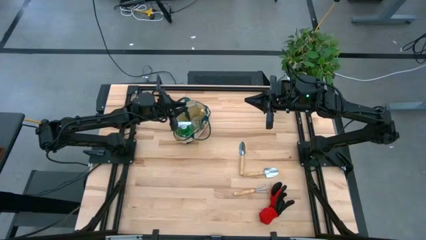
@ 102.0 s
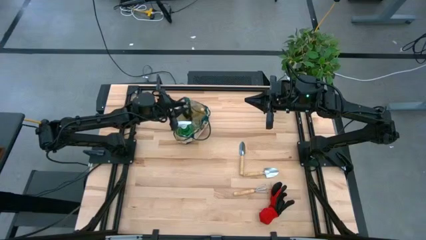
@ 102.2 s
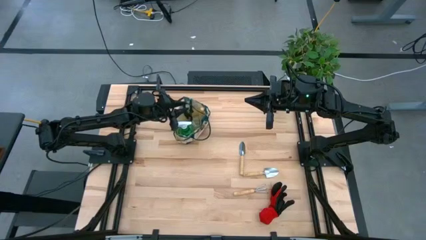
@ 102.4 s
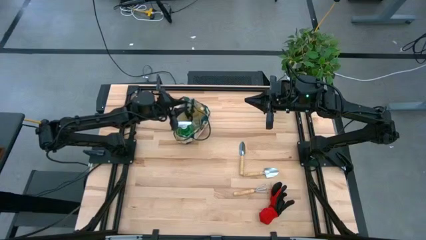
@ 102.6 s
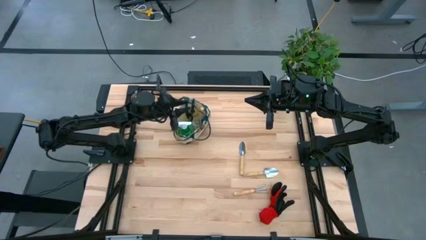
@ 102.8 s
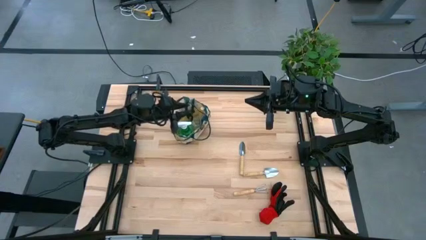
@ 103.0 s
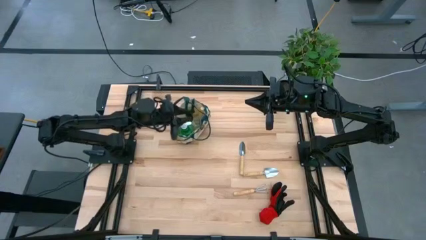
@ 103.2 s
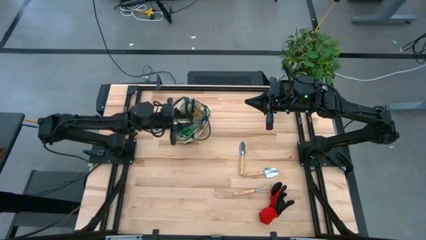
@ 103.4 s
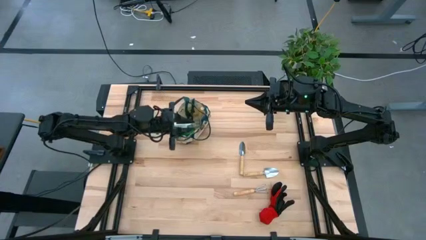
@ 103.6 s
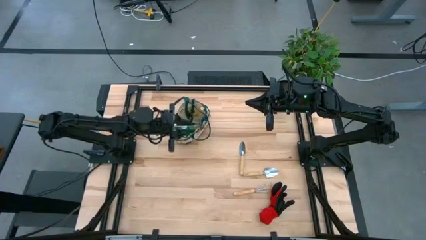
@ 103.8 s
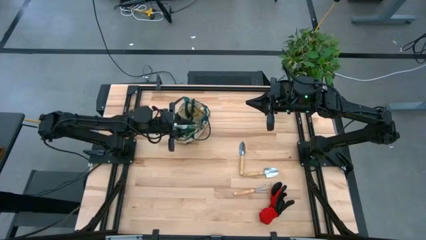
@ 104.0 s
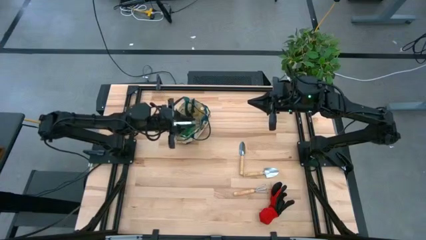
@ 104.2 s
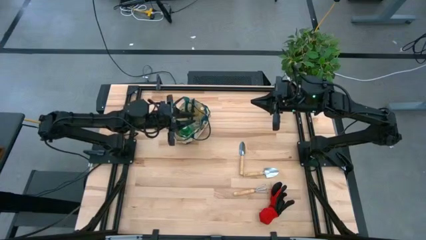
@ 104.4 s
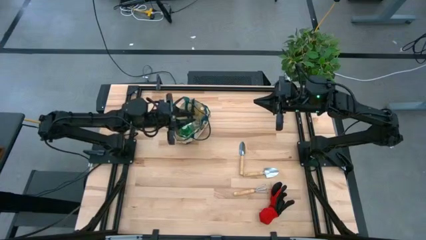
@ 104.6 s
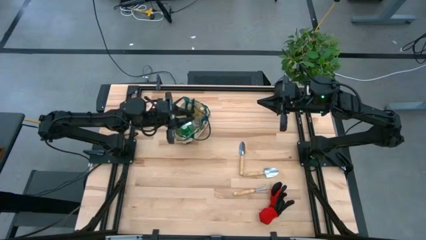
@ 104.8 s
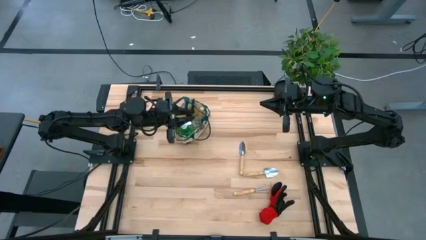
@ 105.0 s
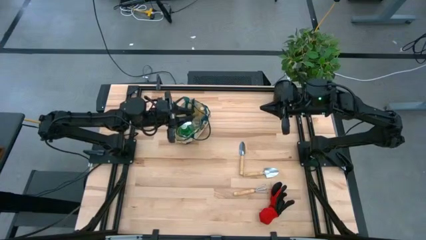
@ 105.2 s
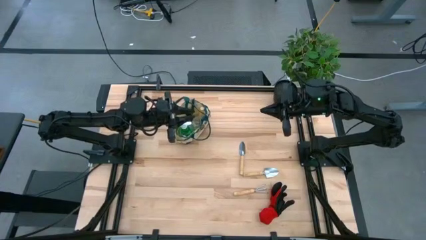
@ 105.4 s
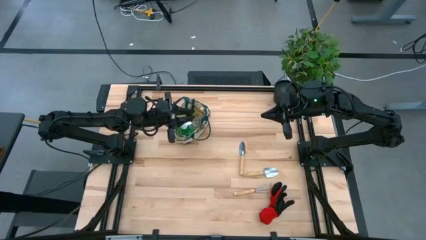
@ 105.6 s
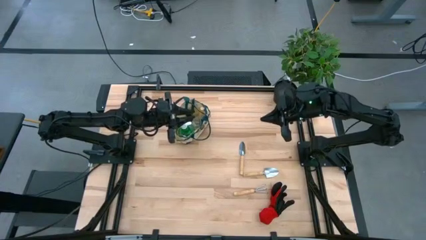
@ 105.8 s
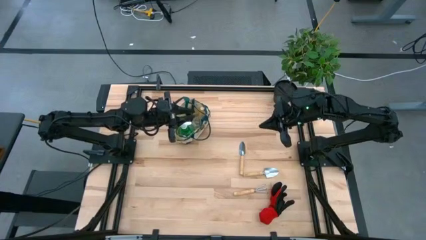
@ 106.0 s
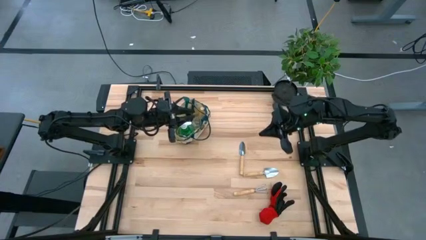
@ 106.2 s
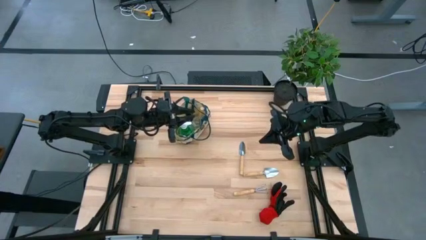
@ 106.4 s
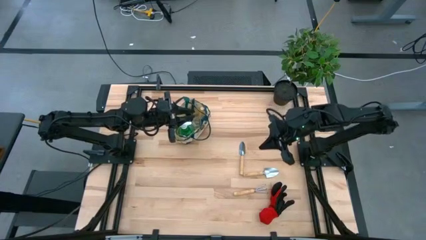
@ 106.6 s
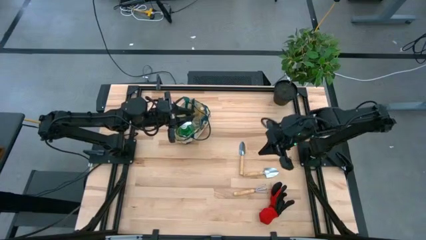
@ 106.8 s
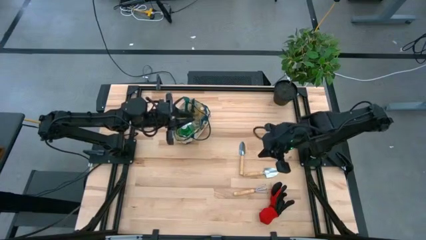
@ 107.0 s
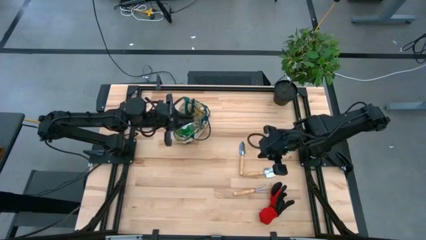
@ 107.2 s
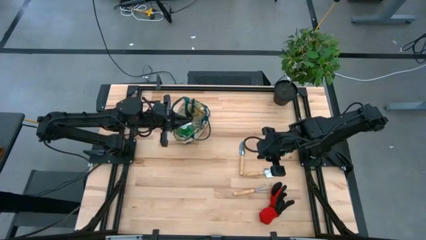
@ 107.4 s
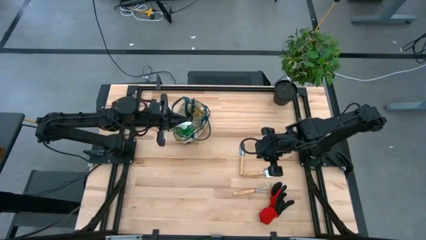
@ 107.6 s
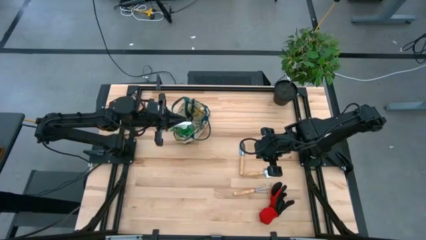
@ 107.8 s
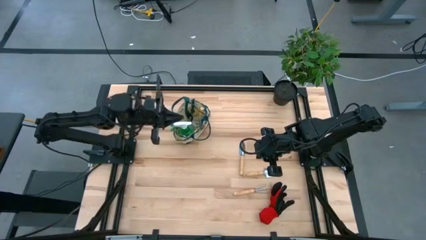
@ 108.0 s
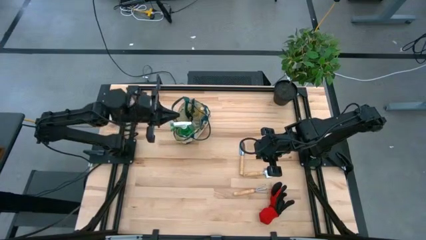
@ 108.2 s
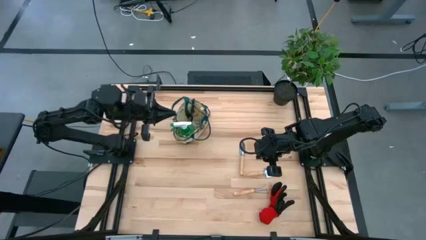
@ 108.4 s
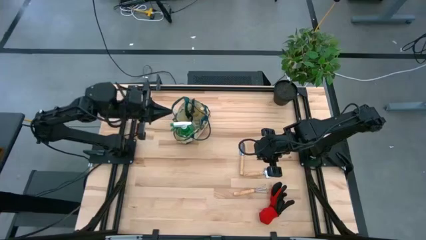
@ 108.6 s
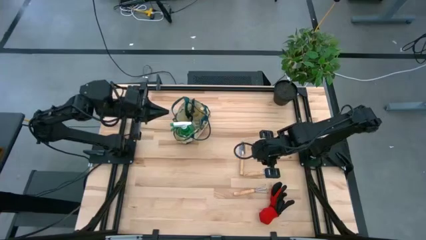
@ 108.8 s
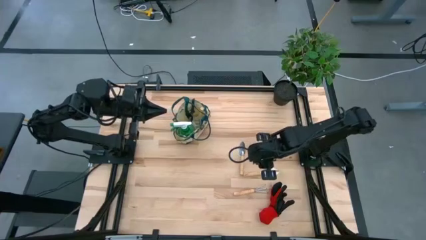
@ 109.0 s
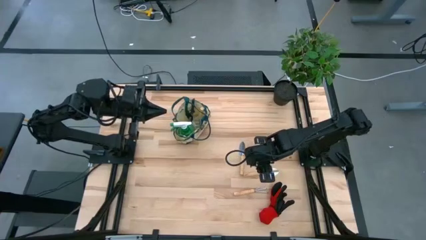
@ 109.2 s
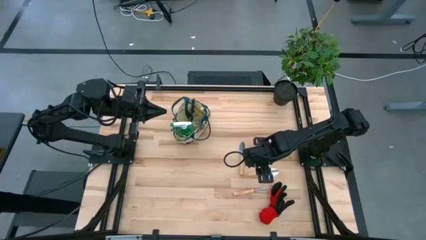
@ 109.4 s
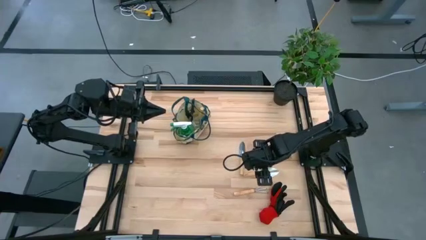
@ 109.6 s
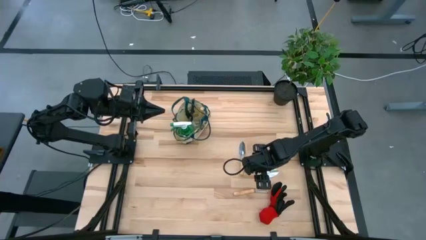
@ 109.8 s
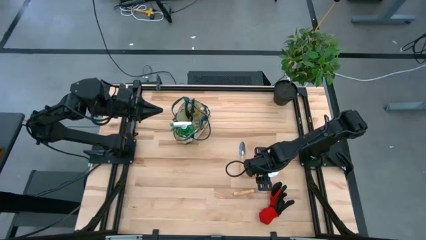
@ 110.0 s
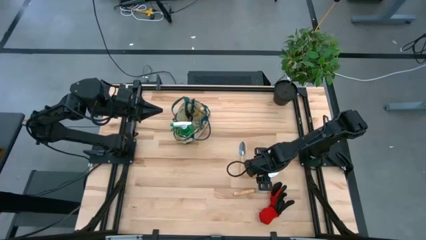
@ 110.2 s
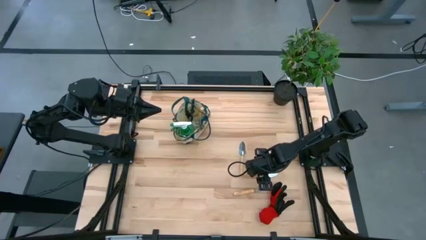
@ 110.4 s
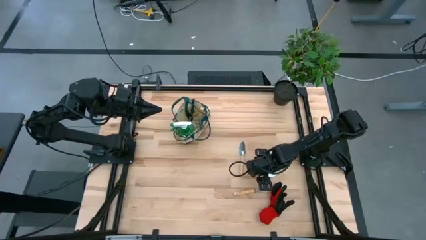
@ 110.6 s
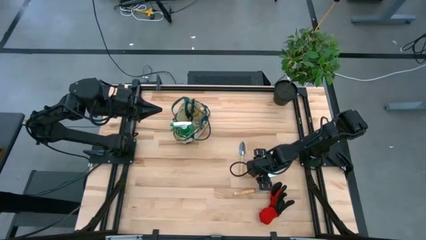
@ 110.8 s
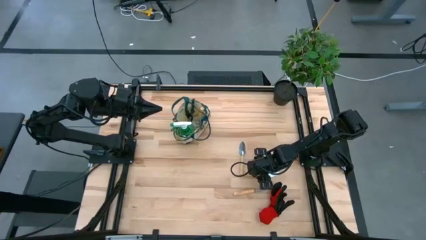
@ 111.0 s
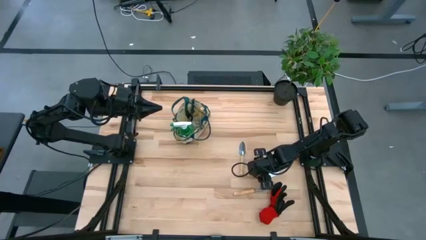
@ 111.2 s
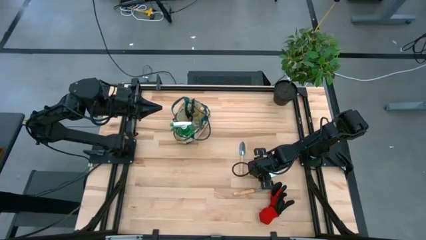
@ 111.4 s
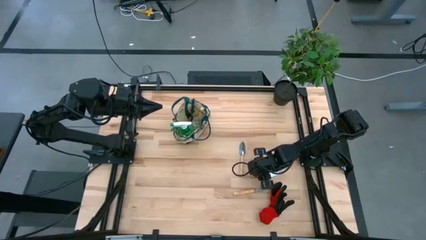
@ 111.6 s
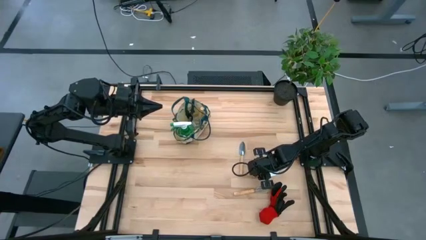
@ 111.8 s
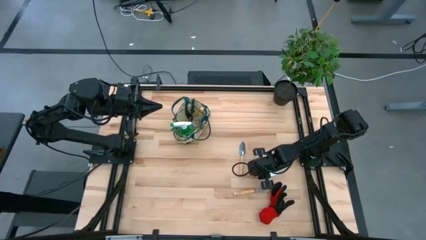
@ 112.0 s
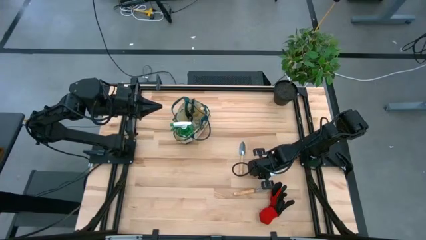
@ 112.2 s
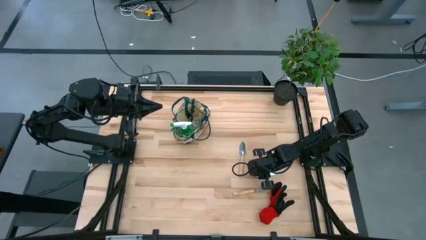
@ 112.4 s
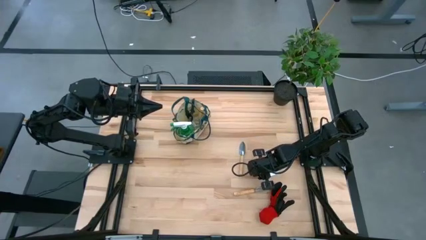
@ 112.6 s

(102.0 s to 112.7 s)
Task: Pick & Place Garden tools in Gardening bag
Put the right brown trowel into the gardening bag

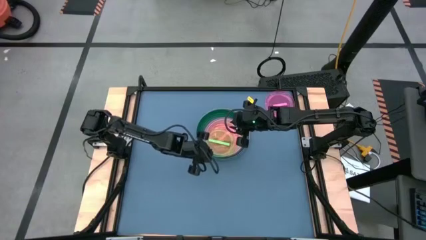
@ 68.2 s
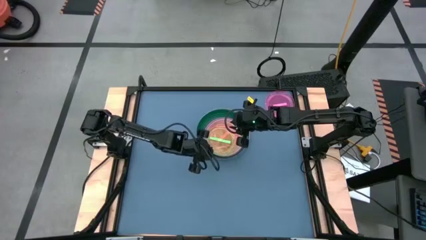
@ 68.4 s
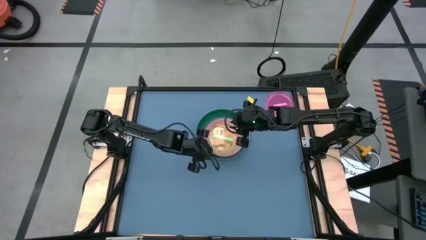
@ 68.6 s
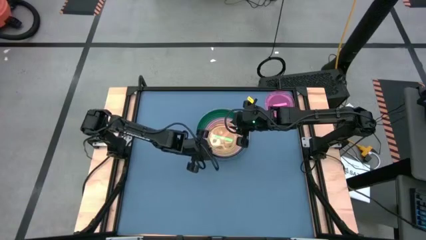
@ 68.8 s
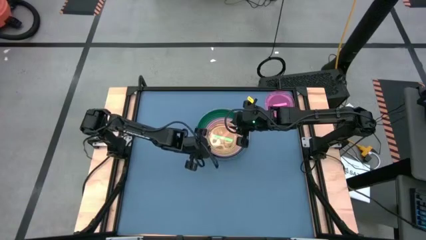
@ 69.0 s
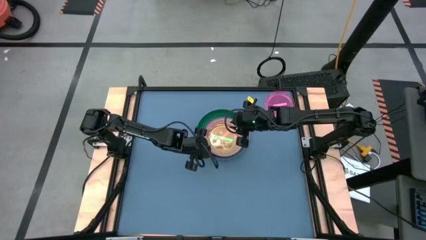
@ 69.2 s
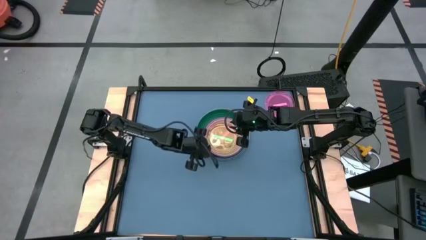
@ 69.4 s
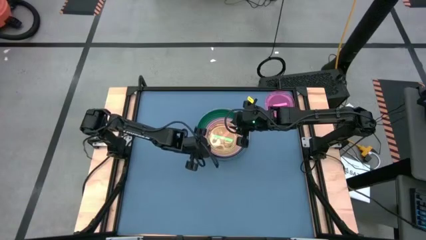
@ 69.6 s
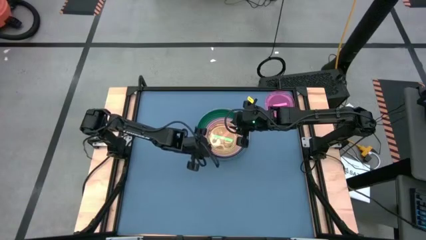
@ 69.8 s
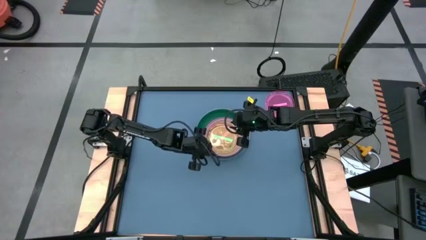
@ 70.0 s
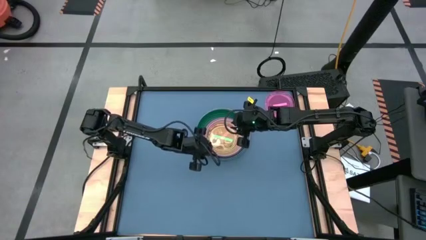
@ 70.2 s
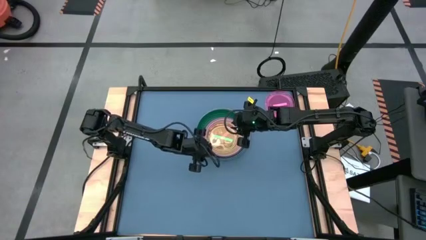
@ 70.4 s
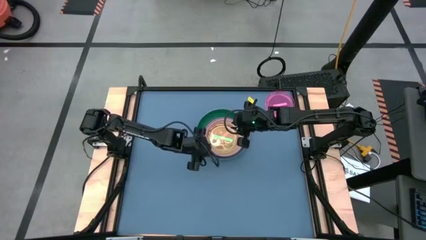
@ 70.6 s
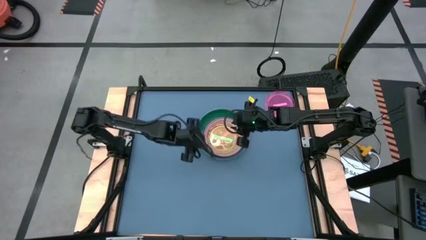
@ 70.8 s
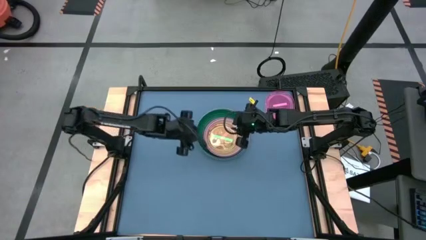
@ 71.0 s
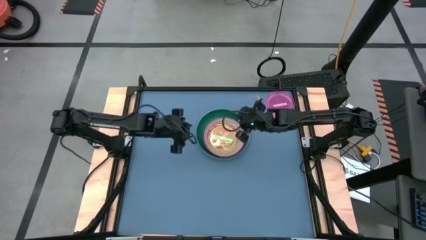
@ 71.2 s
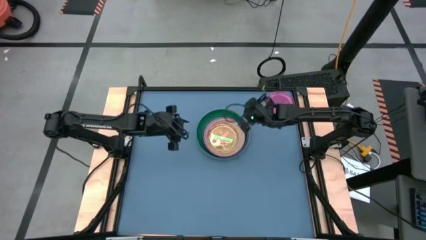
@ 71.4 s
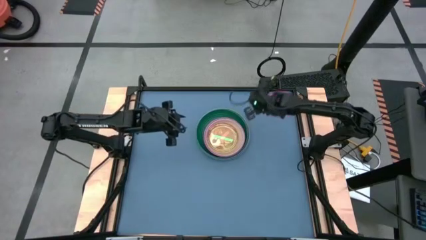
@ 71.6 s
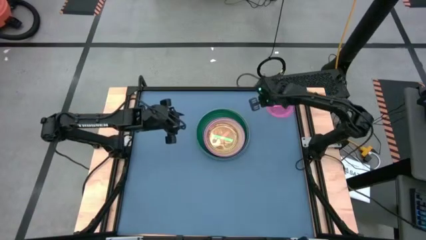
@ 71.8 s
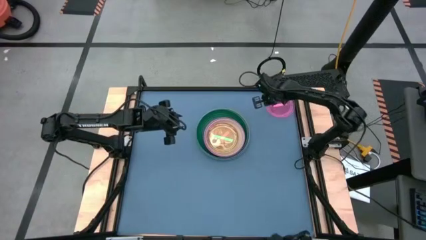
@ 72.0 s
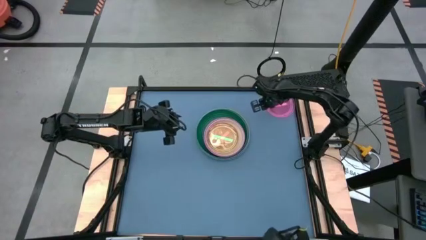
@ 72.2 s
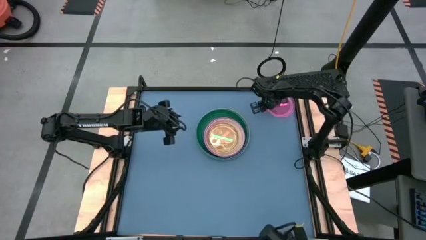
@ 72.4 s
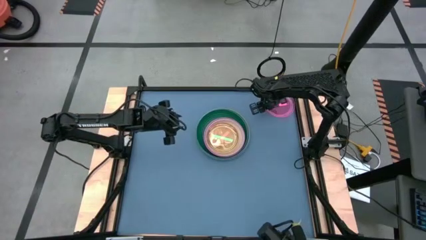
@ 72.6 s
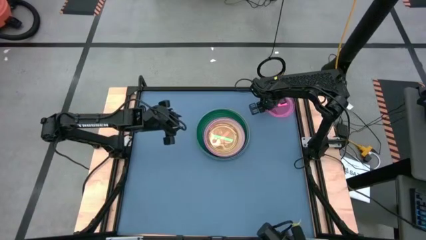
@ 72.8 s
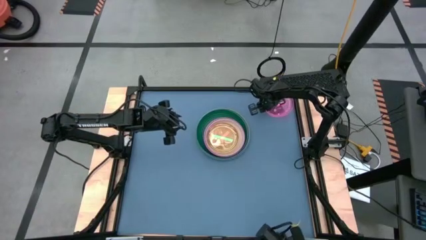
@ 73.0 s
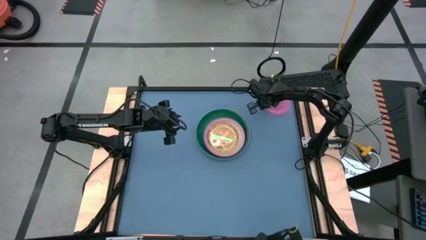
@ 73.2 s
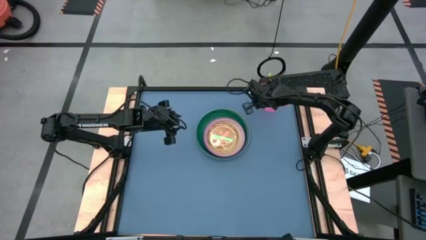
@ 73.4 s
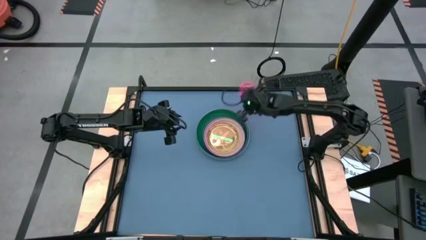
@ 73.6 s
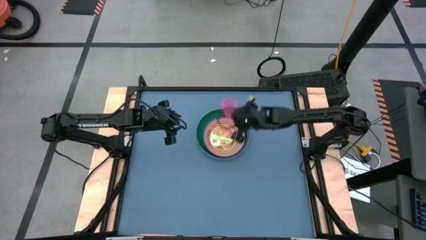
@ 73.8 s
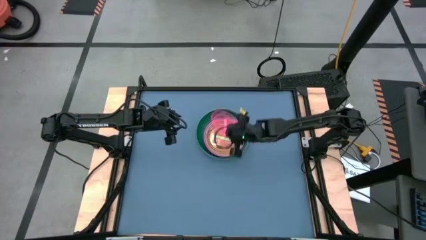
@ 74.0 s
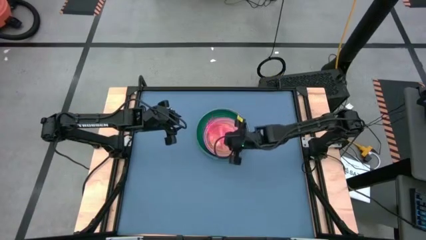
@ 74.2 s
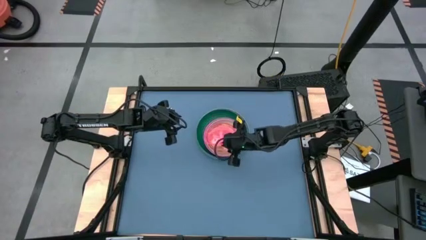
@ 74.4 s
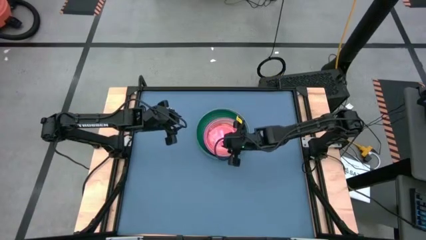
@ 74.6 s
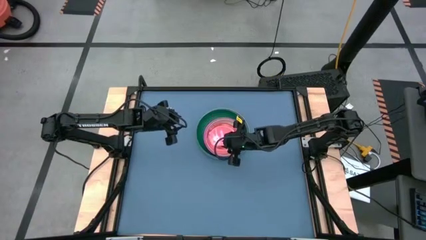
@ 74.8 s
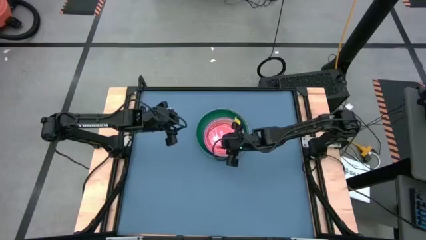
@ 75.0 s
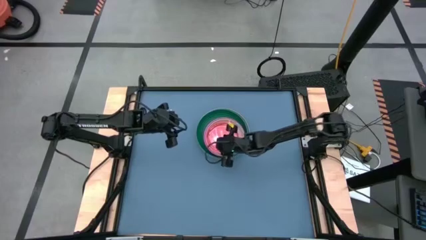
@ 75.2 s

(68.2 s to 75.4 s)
Task: Stack plastic plates
Stack the light pink plate on top of the light green plate
